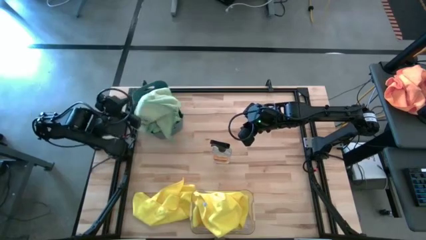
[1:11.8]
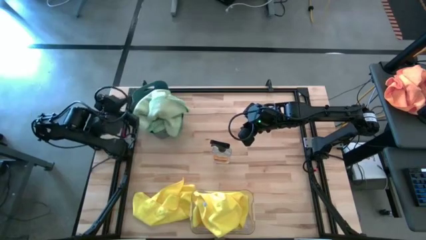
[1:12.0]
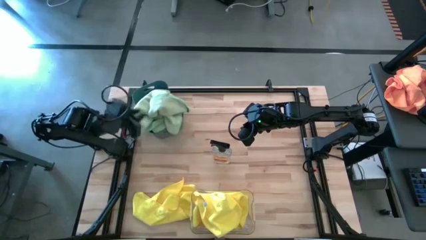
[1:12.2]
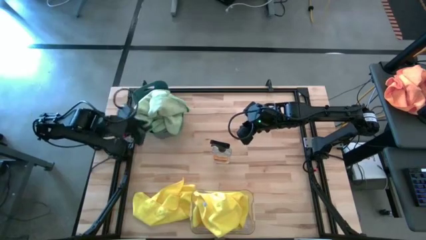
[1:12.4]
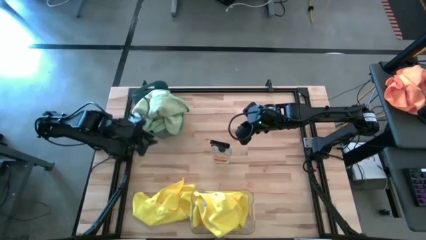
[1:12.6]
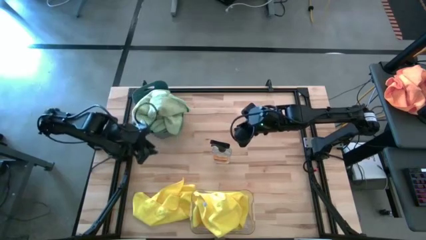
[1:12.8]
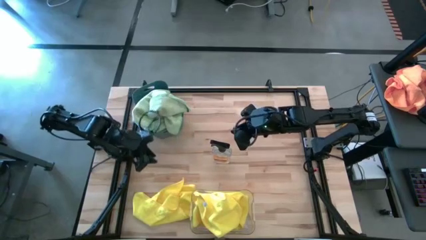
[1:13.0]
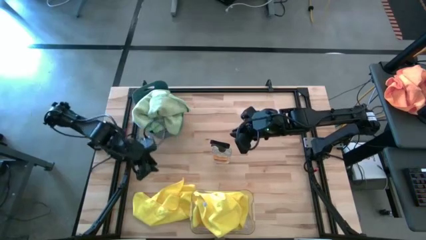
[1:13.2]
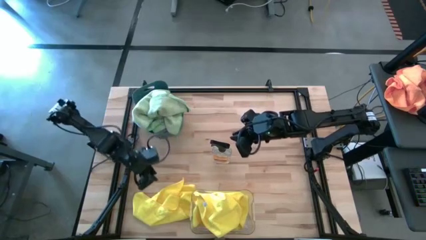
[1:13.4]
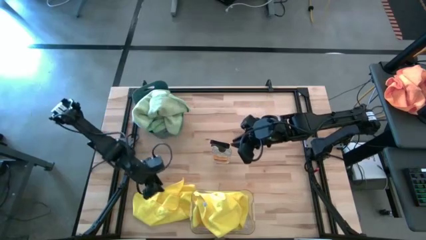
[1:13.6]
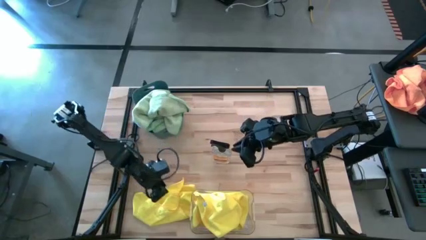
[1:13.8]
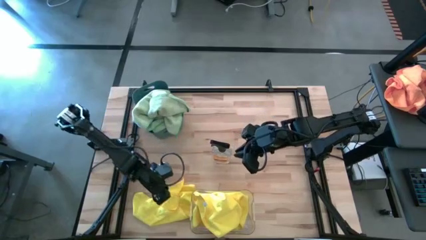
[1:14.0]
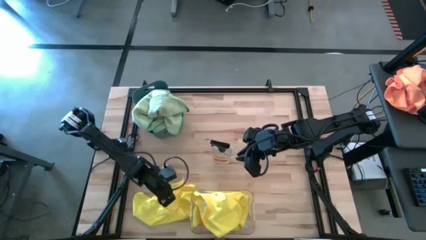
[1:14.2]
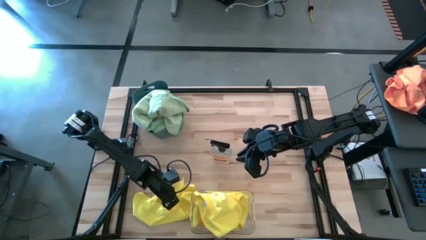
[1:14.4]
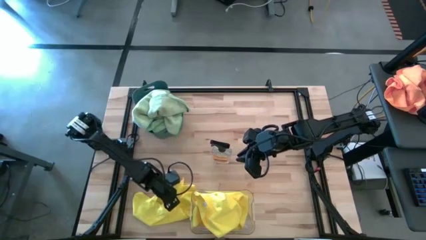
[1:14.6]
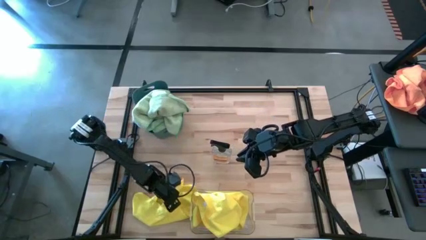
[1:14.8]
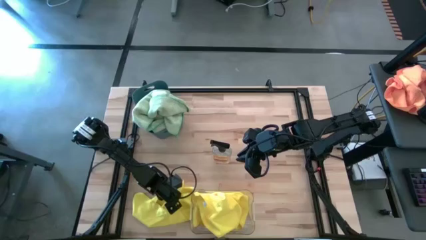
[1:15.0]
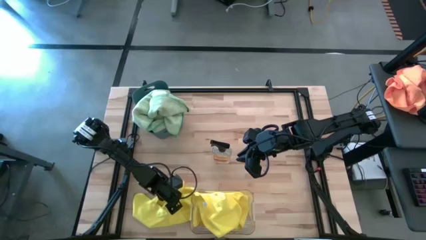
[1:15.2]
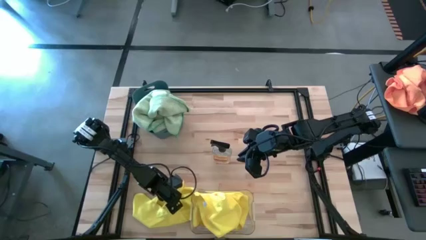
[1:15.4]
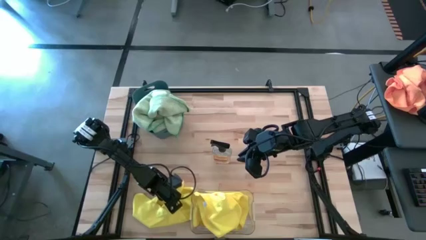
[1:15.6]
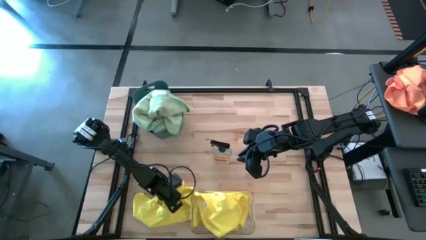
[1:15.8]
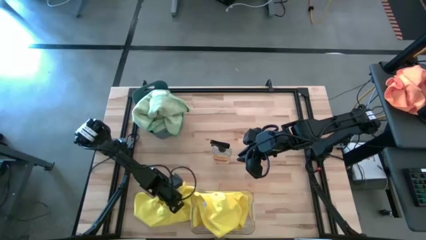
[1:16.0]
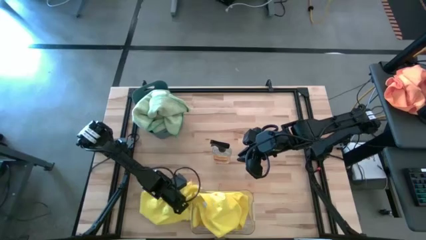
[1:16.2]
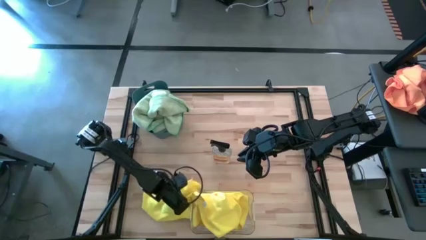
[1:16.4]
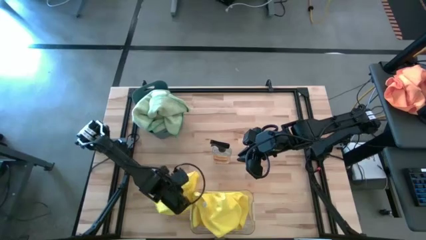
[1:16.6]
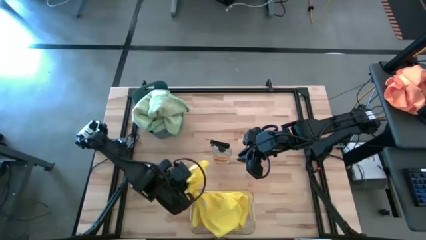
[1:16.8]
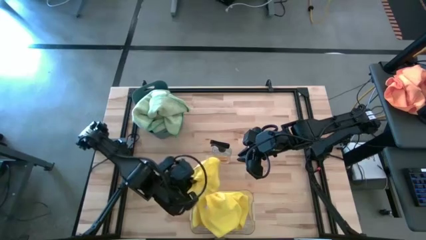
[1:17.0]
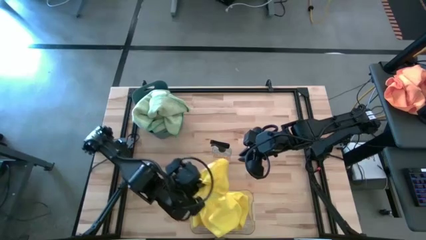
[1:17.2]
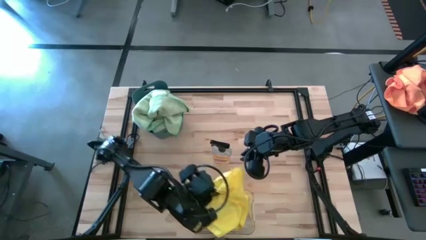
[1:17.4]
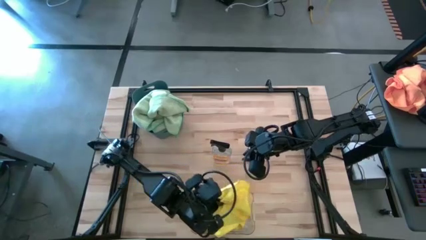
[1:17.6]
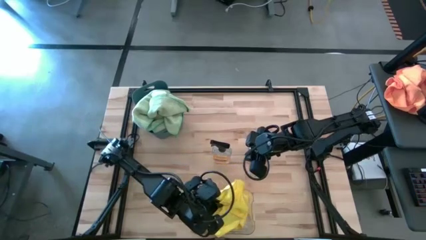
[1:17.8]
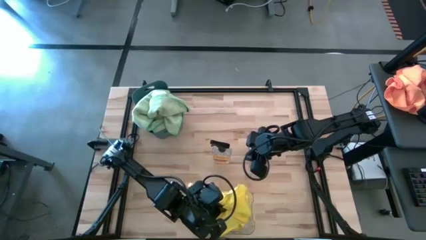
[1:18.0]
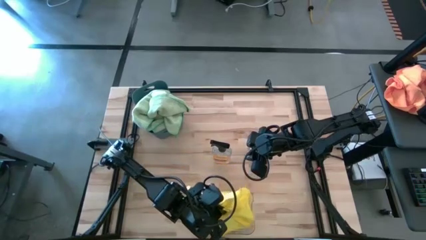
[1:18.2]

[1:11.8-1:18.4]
Task: Sort microfiber towel by color & place in baskets
Put the yellow towel into the transparent bin

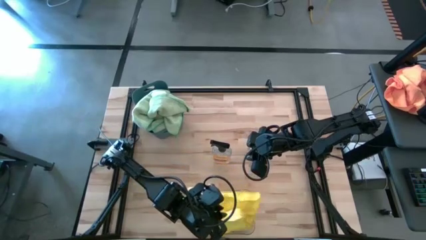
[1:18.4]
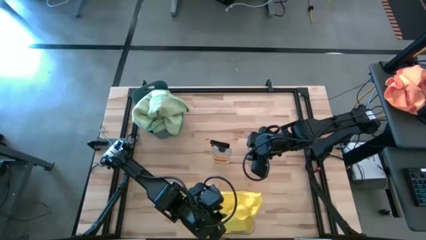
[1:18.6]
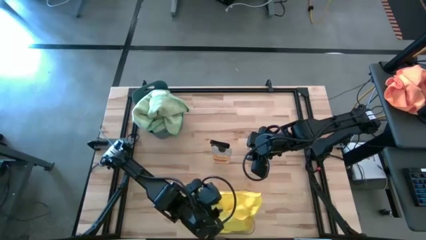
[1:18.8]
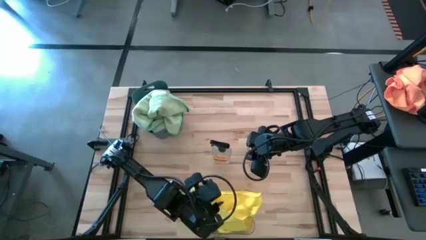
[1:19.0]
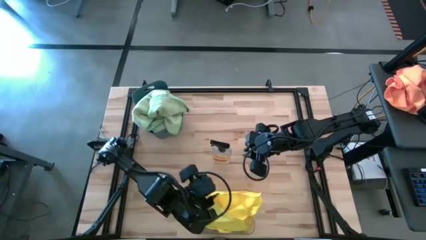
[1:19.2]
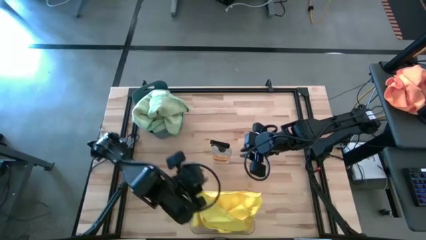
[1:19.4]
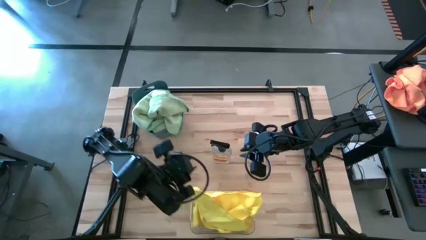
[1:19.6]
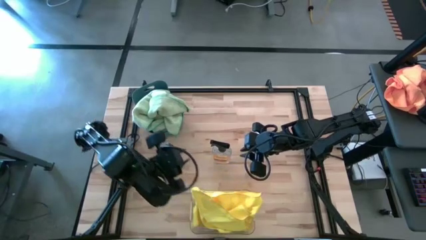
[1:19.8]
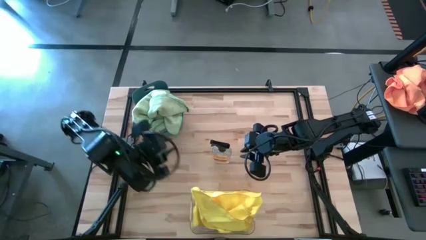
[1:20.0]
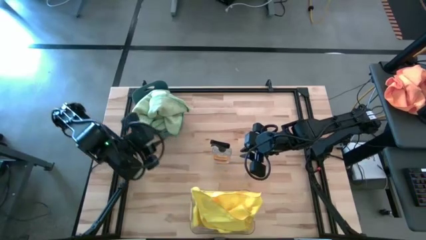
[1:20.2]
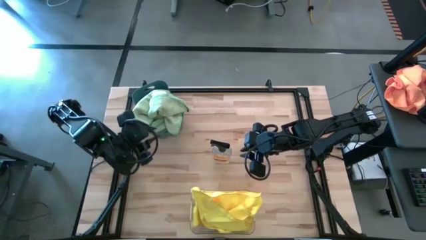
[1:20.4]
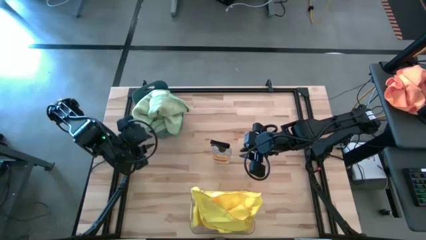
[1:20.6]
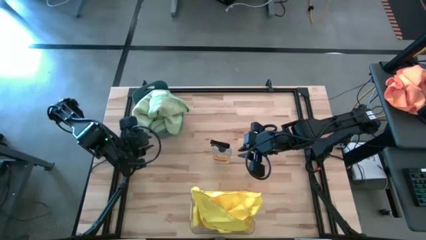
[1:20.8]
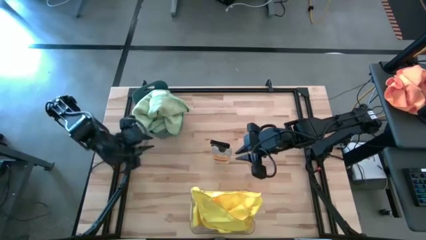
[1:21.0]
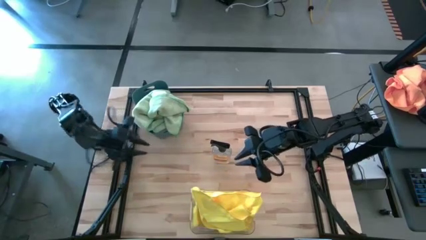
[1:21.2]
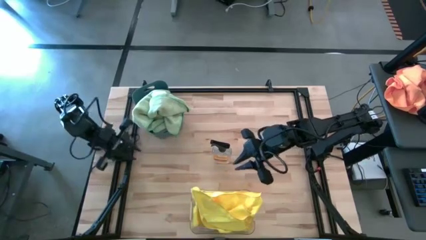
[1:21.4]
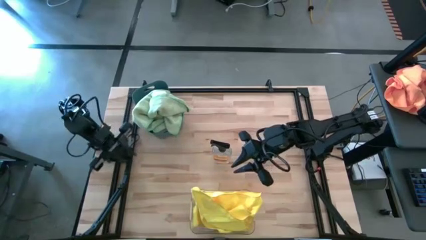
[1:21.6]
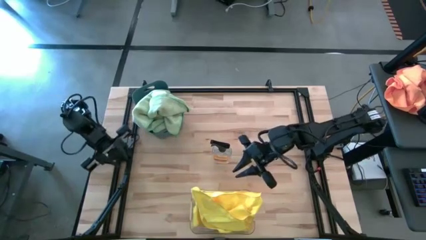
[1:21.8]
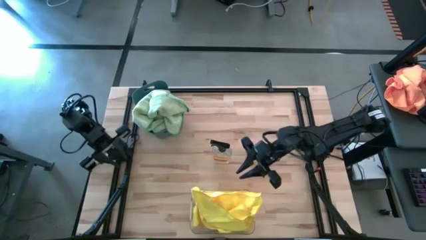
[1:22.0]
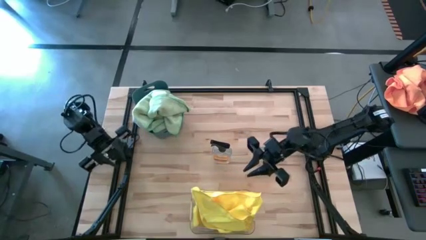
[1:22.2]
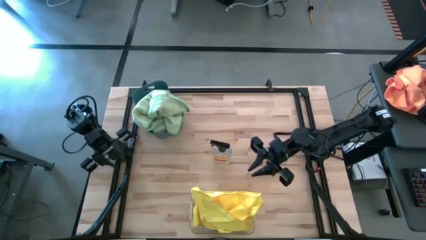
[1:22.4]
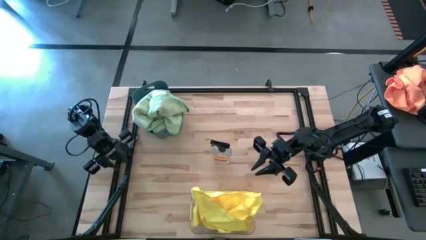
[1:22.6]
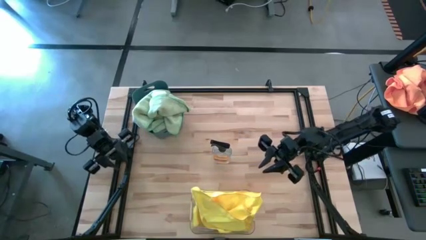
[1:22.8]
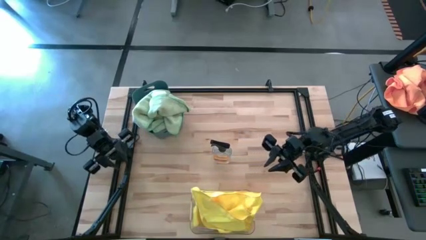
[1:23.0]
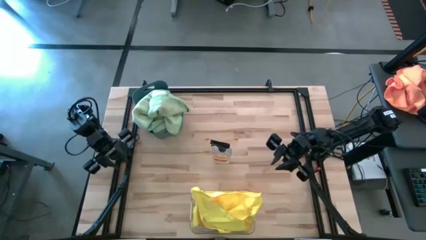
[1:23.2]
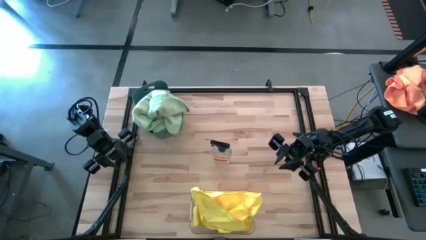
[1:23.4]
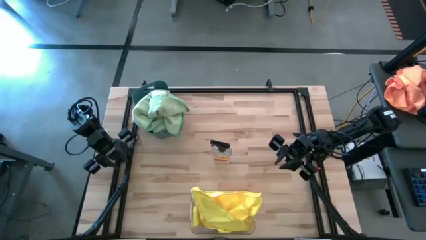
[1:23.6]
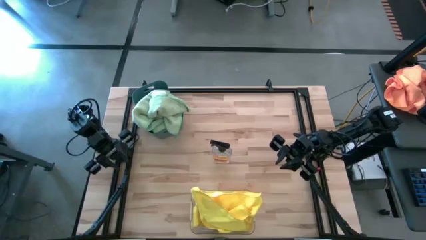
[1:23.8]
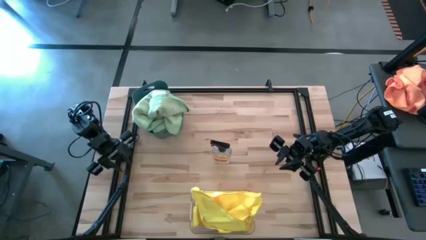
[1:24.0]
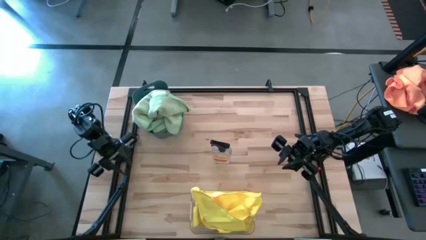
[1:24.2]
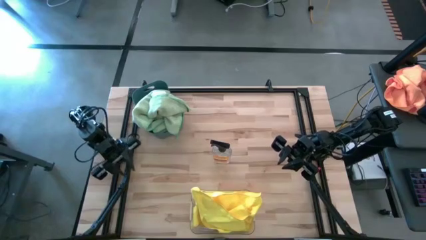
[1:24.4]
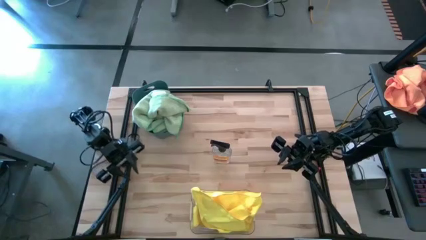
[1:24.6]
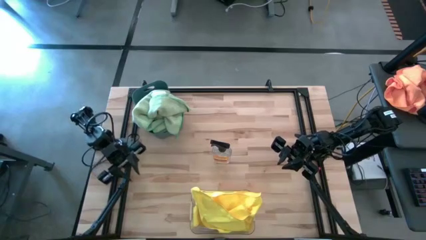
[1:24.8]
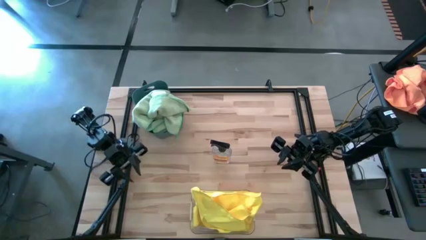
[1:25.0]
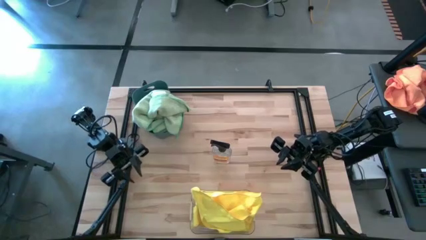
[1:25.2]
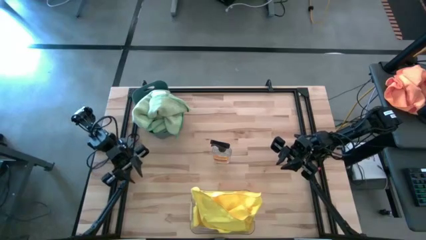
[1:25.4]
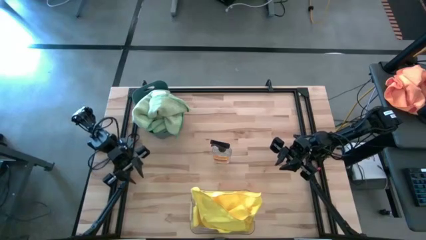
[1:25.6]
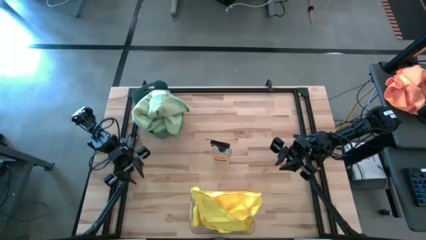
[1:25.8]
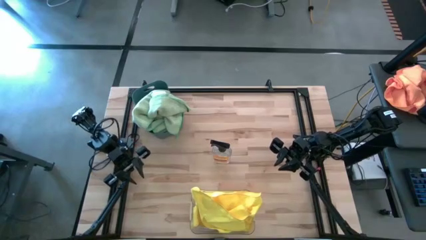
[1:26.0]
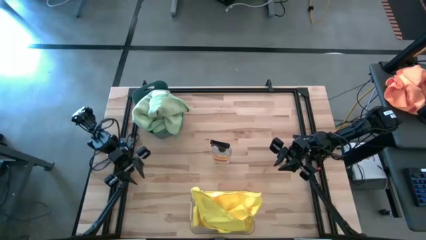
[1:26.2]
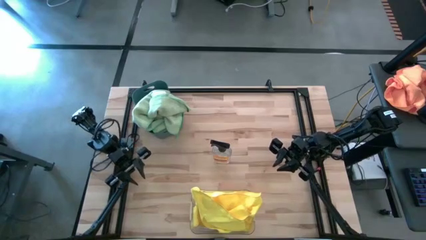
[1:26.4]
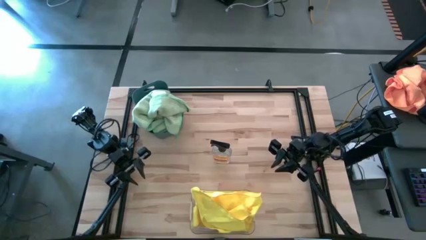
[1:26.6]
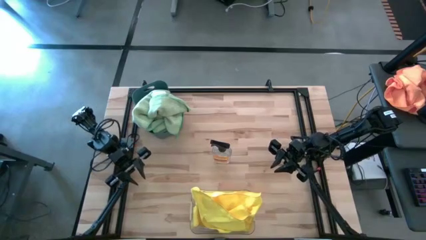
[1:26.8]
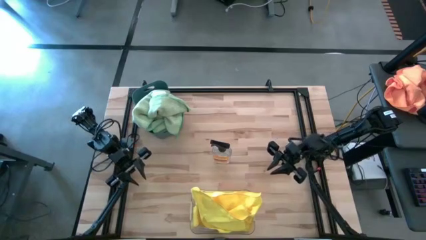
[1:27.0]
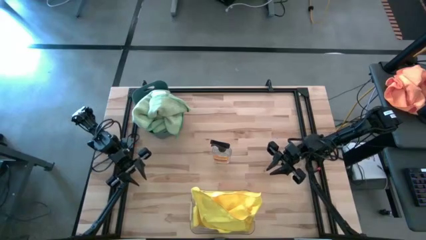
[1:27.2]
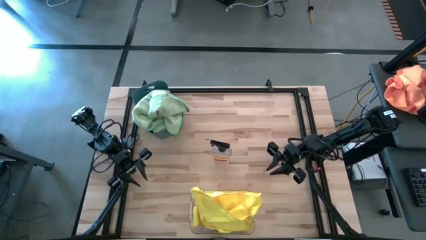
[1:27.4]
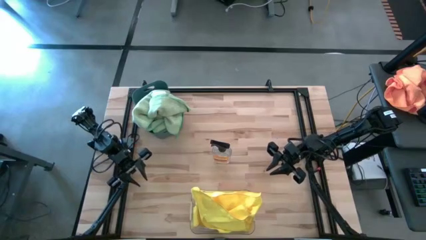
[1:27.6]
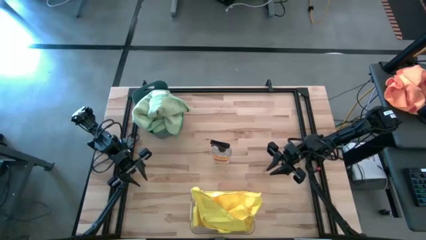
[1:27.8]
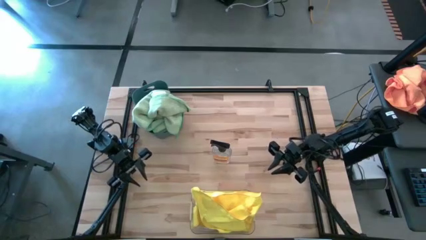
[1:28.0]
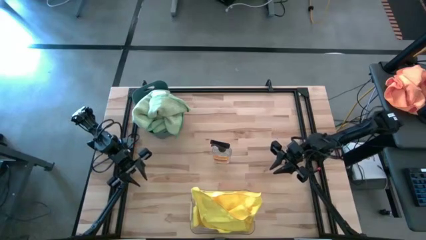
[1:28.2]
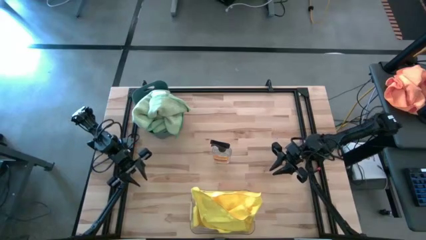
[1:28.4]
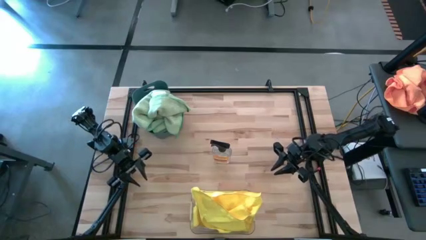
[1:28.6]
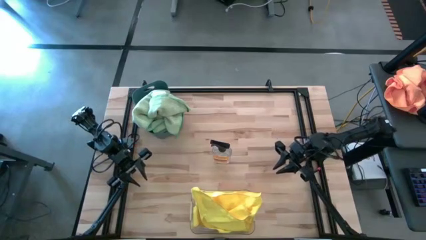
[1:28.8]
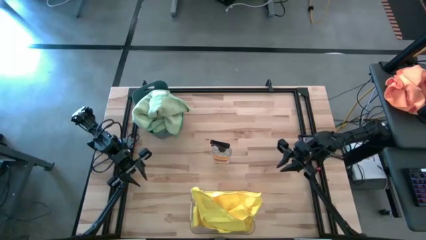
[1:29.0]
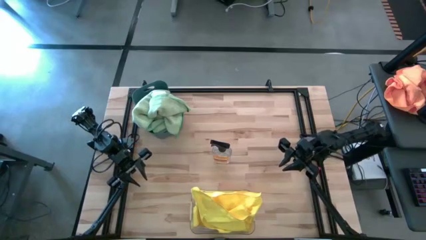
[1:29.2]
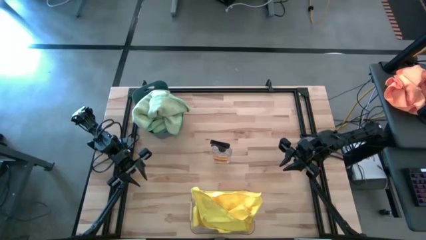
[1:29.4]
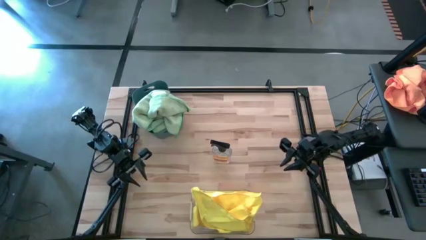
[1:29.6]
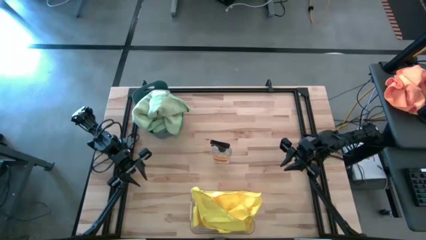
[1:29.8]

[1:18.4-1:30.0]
Return to Home Position
